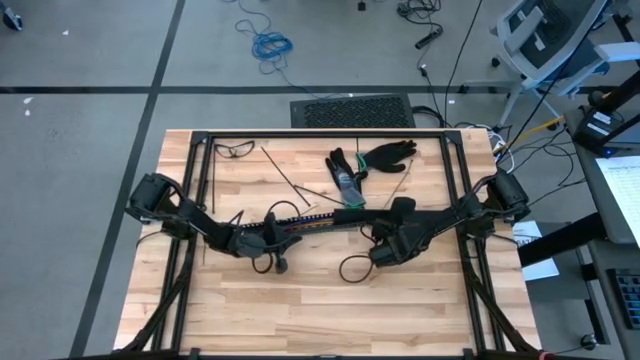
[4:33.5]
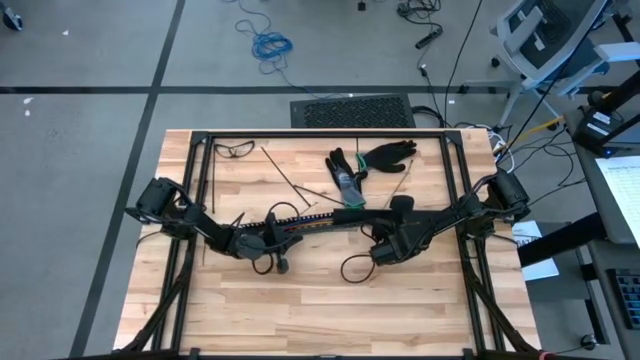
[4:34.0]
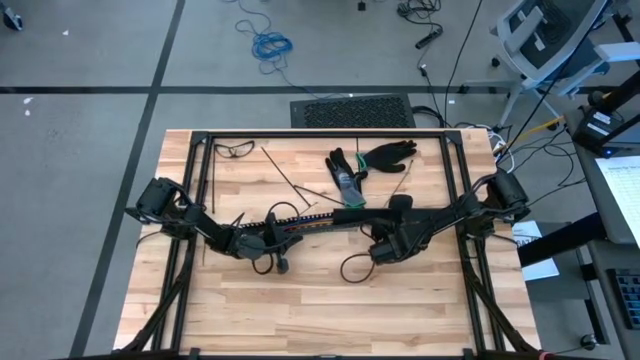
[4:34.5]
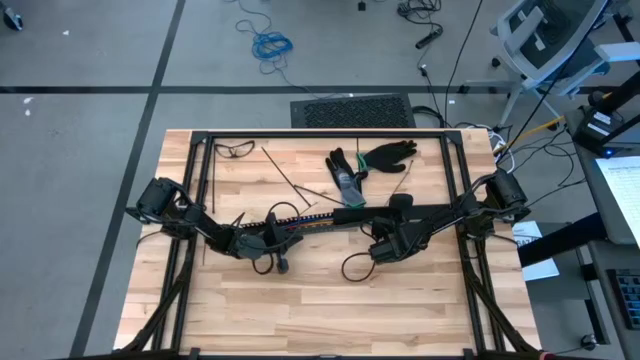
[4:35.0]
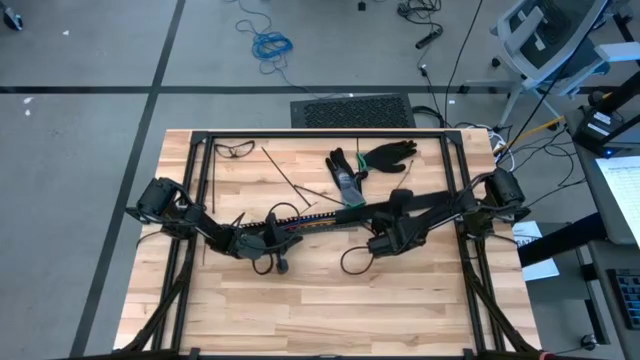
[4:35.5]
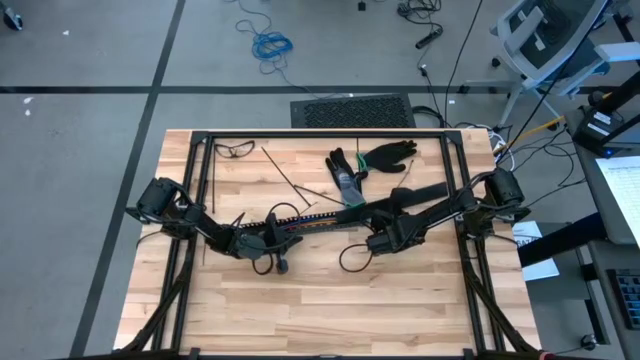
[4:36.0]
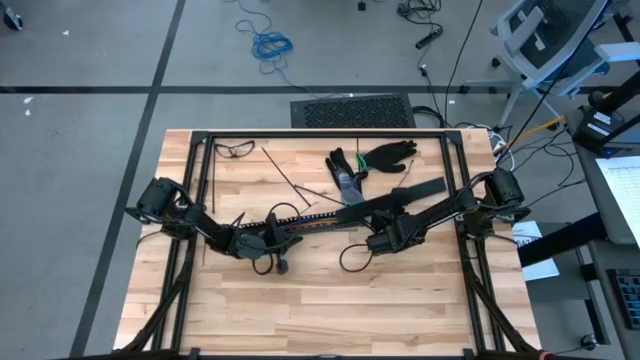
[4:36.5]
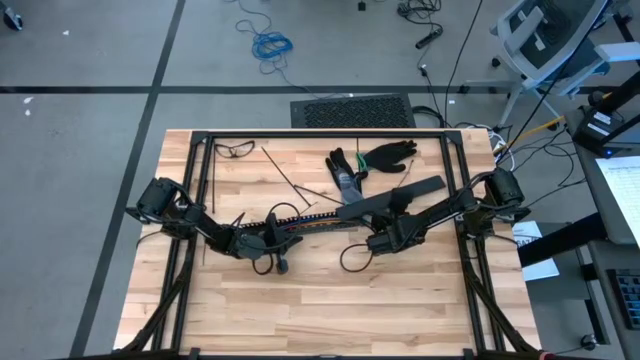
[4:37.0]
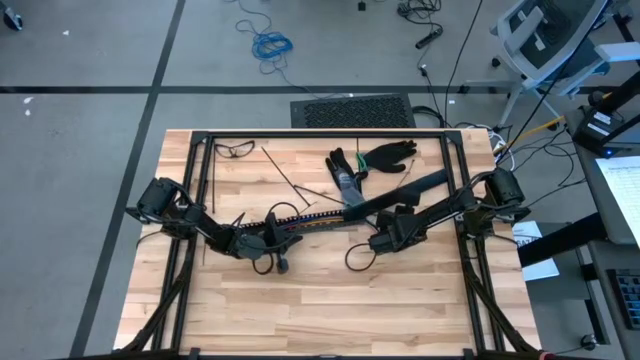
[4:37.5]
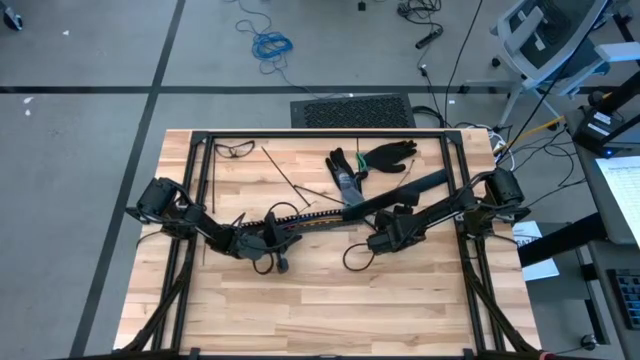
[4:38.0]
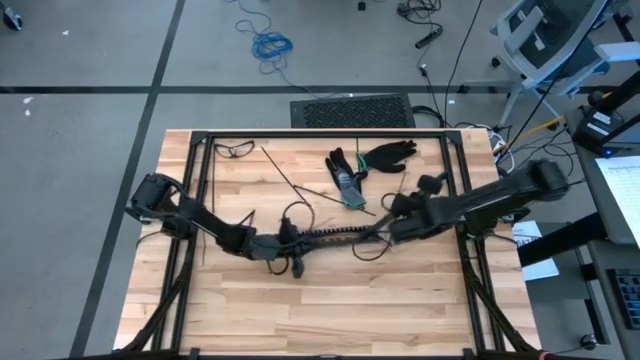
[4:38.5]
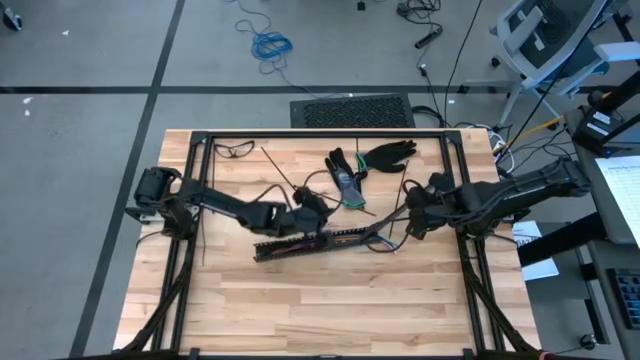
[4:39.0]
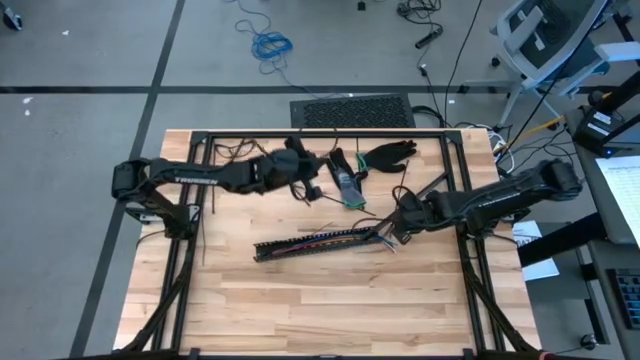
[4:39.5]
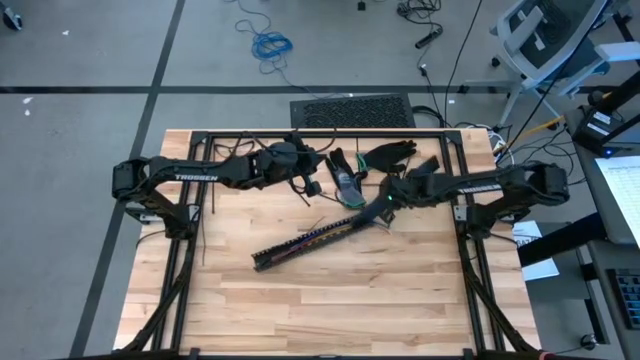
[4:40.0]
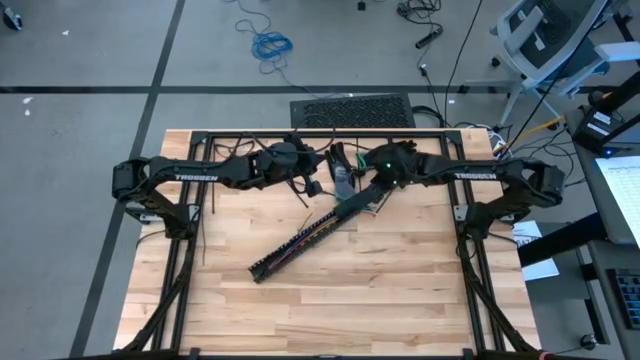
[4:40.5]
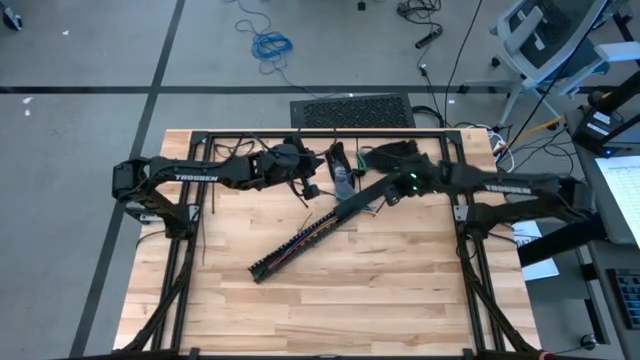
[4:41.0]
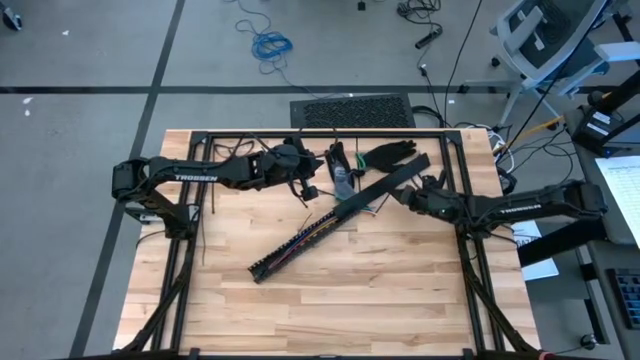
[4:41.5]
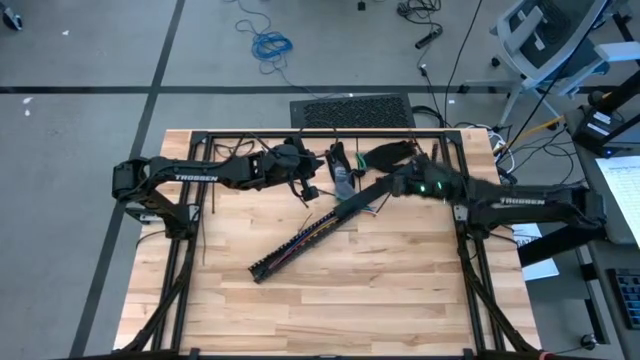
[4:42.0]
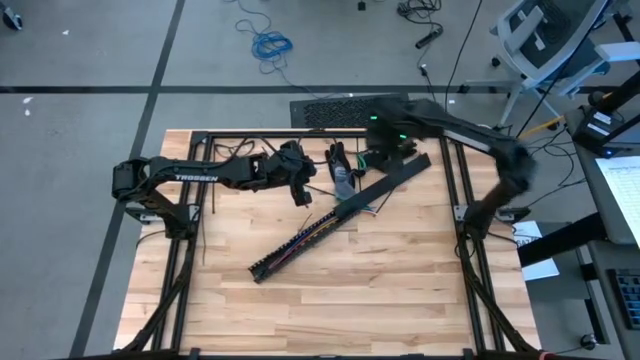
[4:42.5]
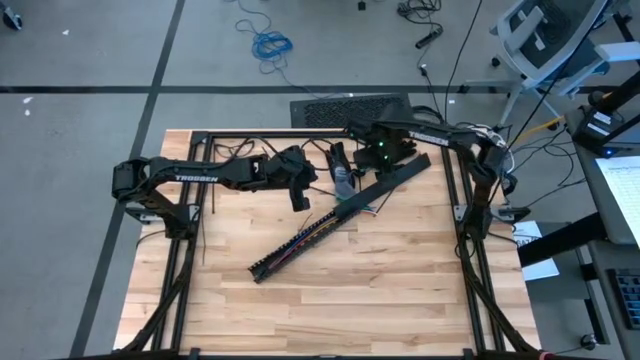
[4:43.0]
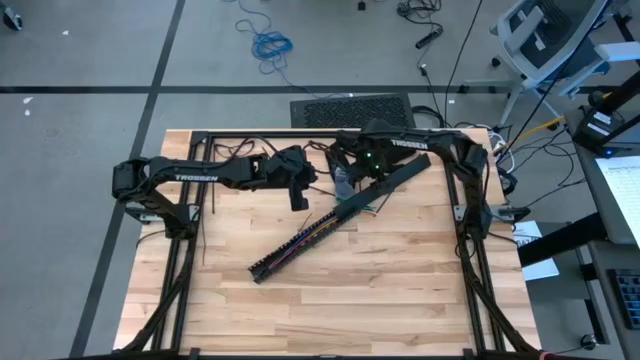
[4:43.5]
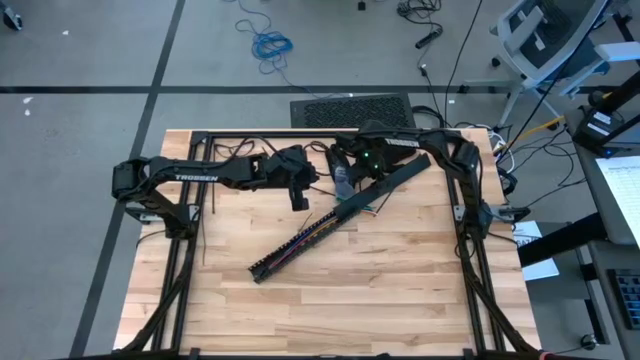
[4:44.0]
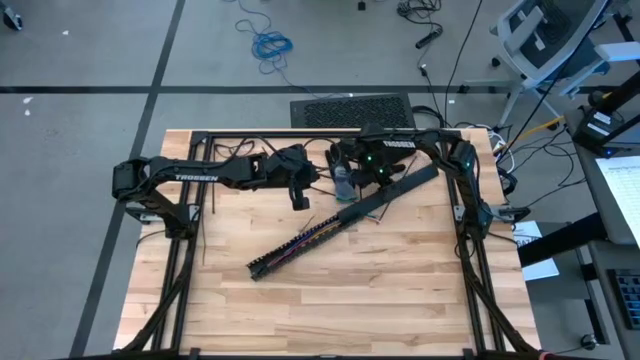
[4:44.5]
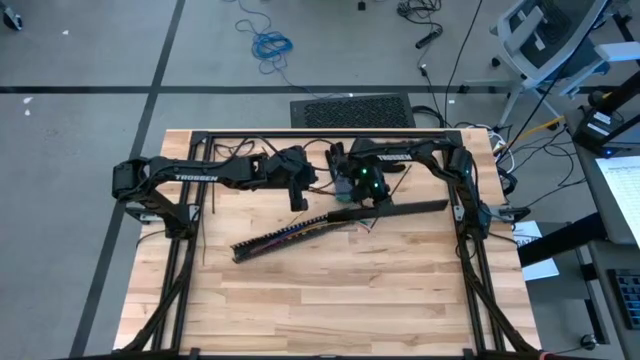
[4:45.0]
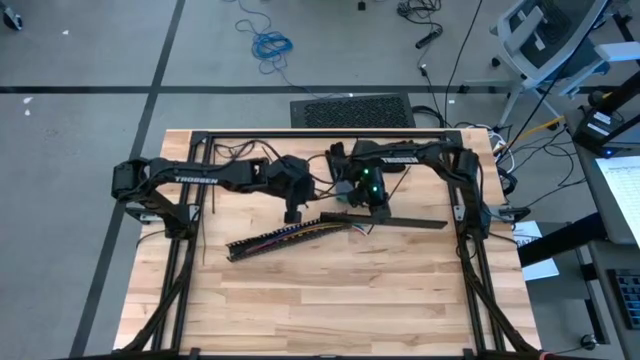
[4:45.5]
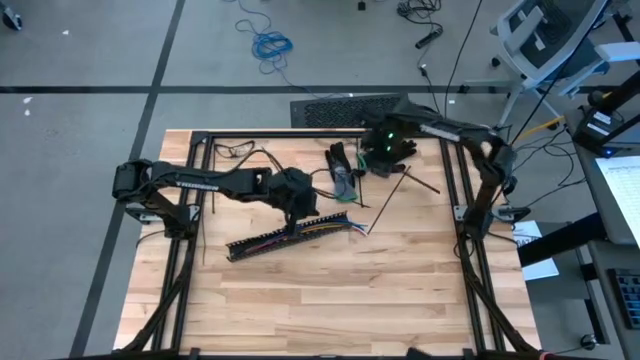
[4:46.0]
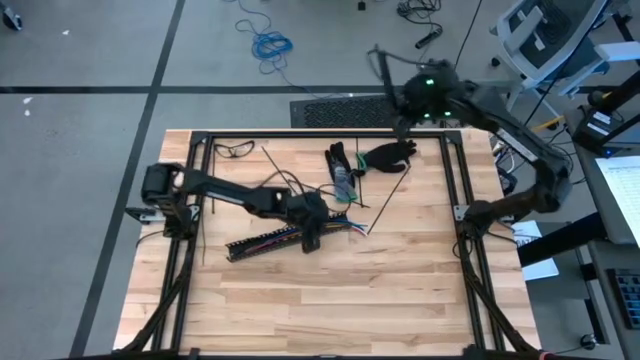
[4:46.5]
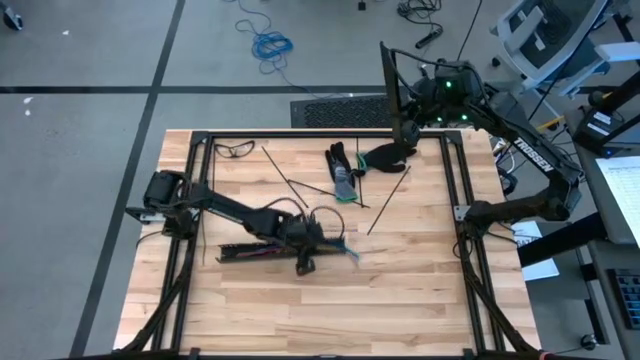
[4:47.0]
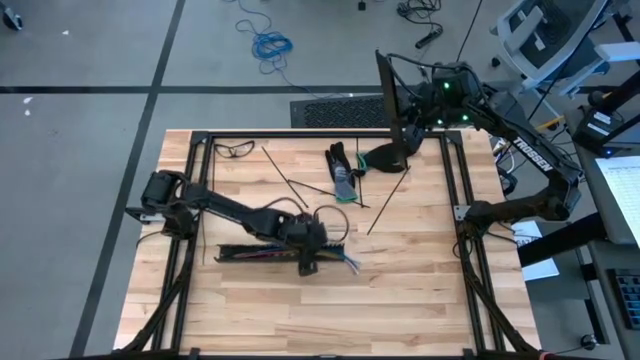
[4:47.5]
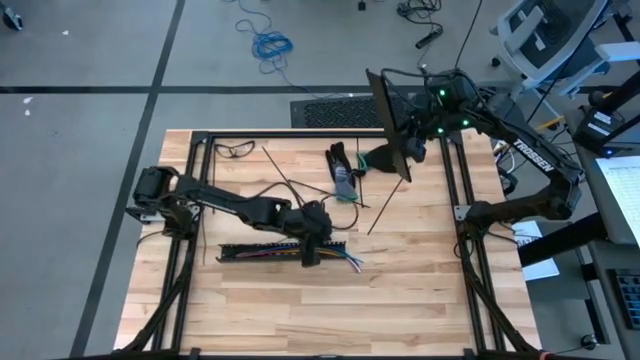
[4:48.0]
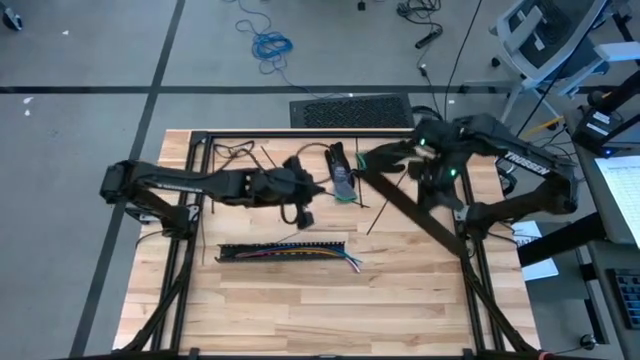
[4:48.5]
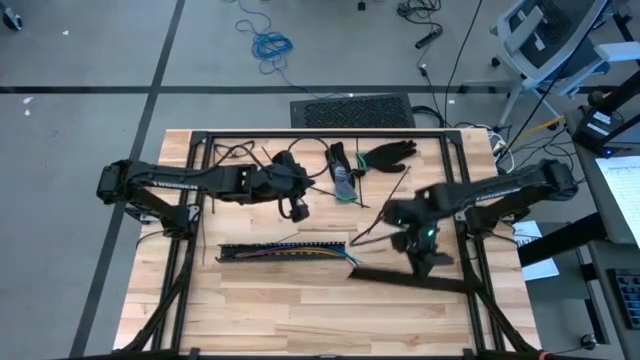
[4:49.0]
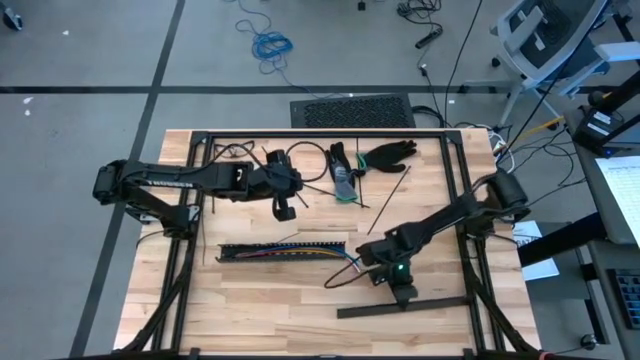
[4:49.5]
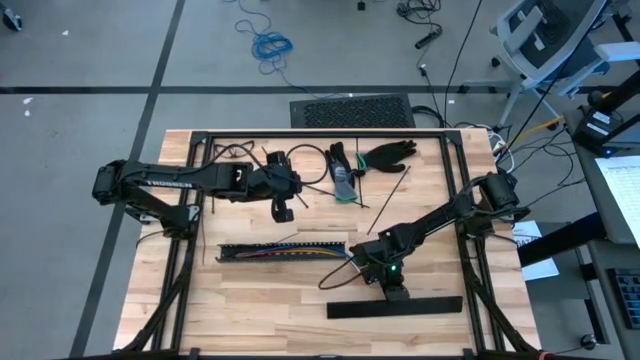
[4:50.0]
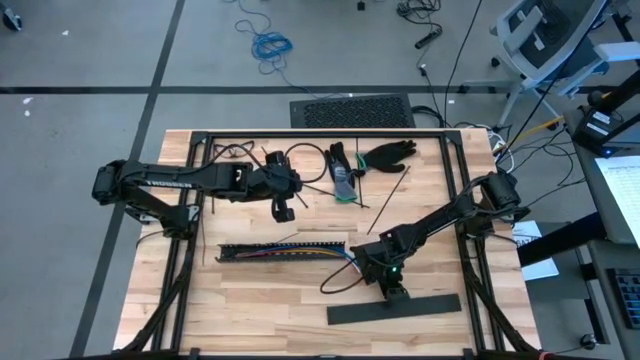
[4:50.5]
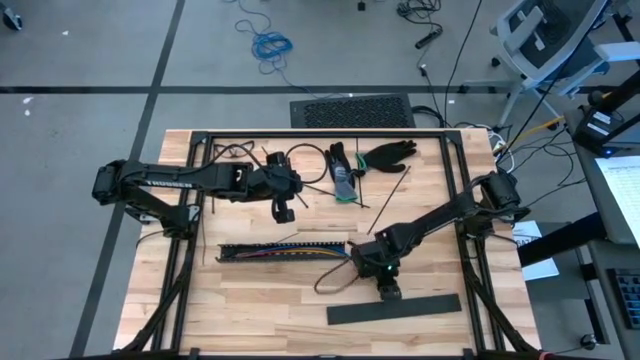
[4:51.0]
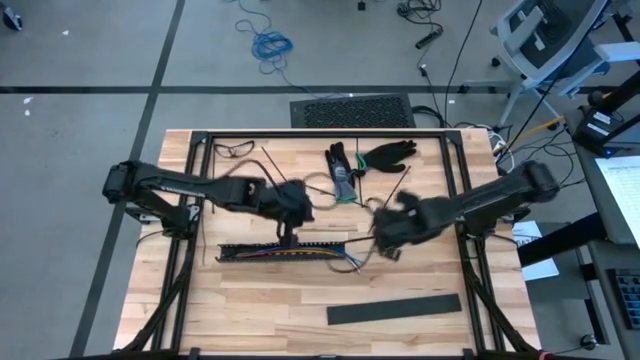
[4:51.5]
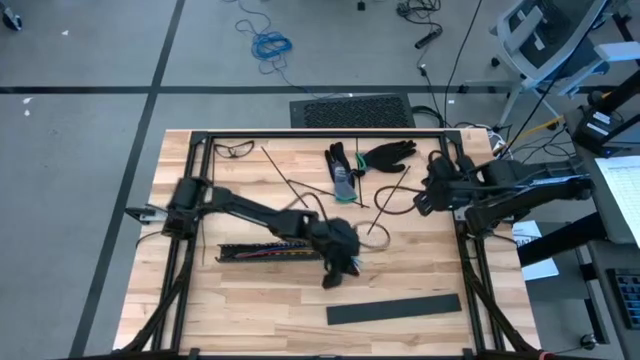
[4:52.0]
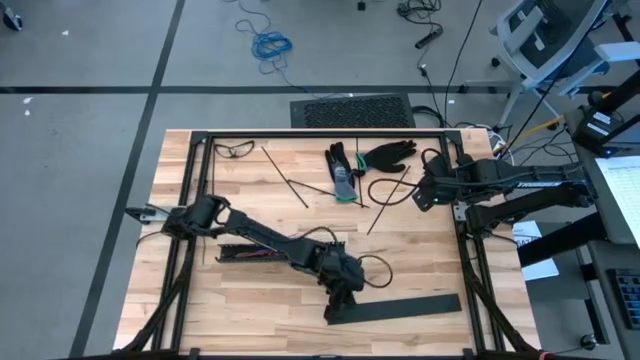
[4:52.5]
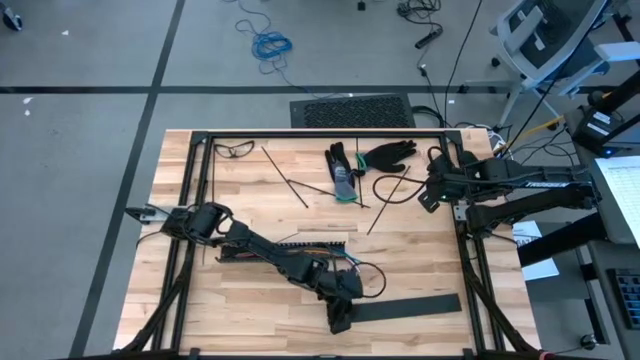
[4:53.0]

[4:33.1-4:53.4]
Task: Ziptie cables
Close the black cable duct
